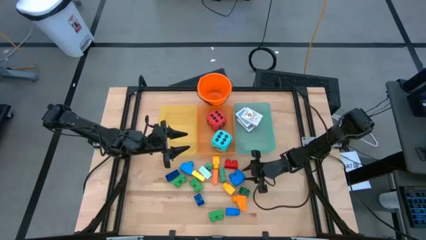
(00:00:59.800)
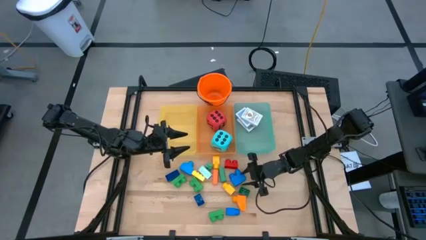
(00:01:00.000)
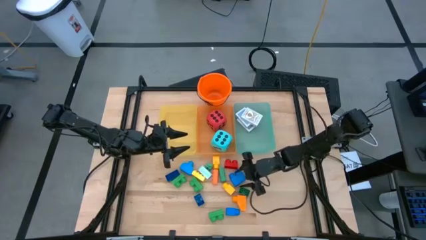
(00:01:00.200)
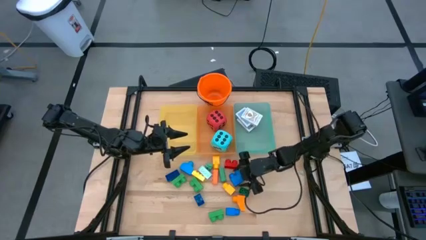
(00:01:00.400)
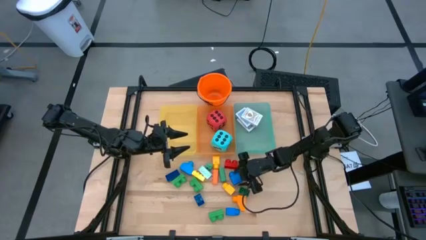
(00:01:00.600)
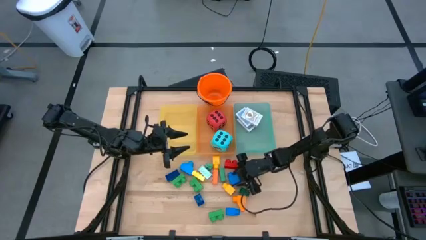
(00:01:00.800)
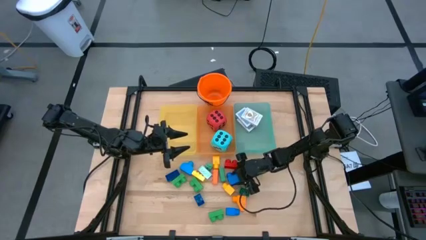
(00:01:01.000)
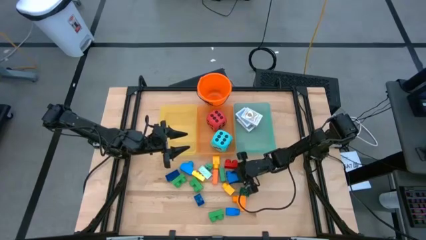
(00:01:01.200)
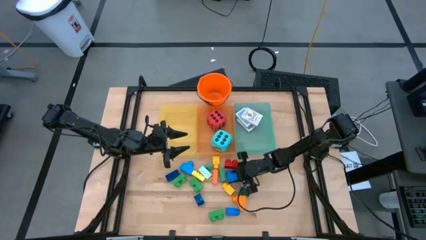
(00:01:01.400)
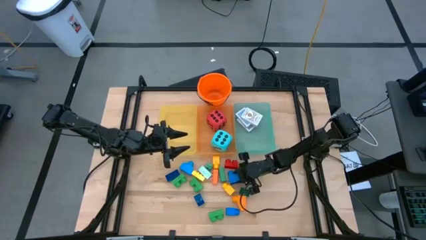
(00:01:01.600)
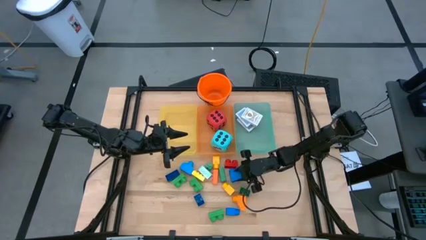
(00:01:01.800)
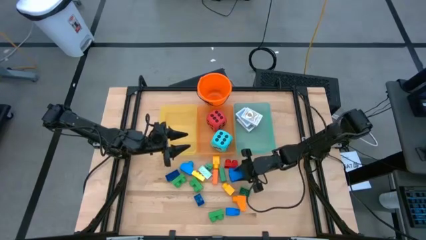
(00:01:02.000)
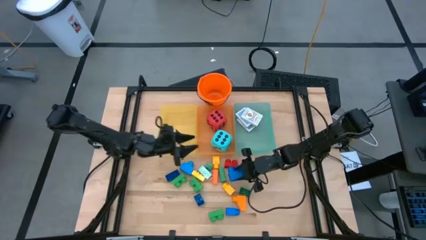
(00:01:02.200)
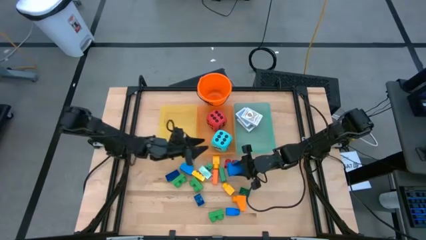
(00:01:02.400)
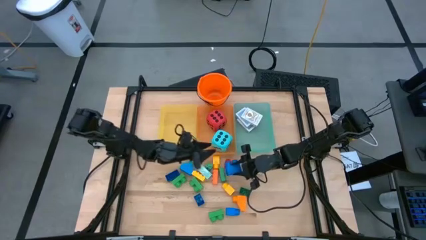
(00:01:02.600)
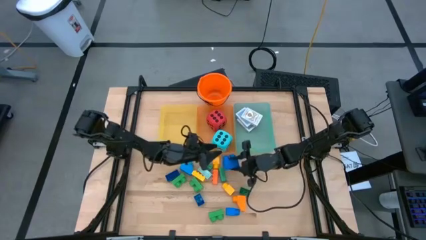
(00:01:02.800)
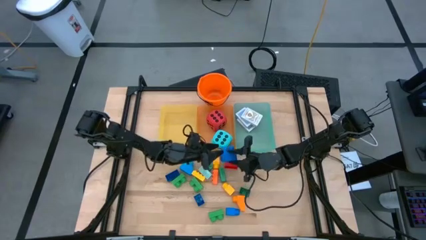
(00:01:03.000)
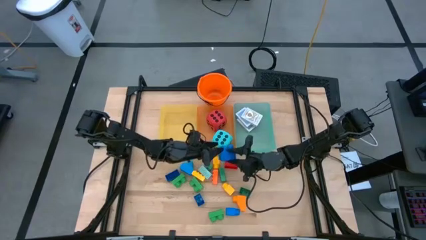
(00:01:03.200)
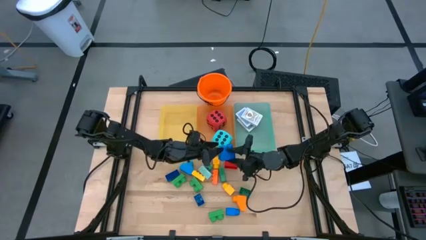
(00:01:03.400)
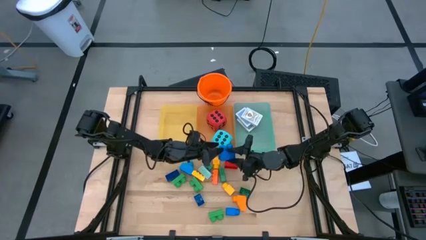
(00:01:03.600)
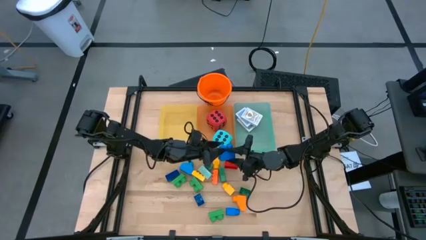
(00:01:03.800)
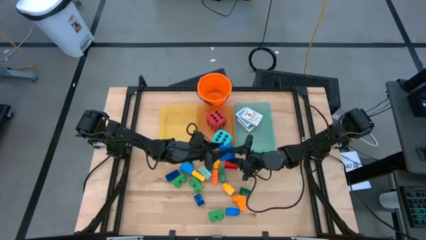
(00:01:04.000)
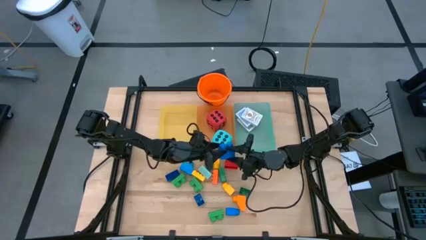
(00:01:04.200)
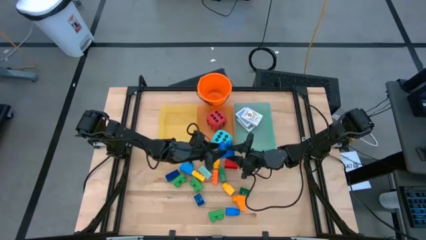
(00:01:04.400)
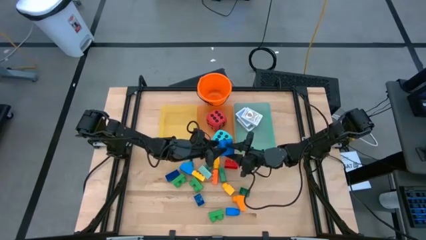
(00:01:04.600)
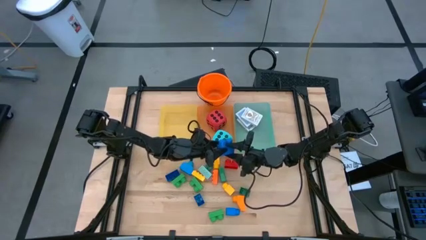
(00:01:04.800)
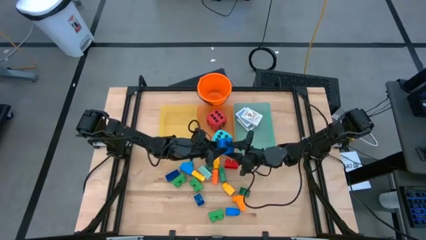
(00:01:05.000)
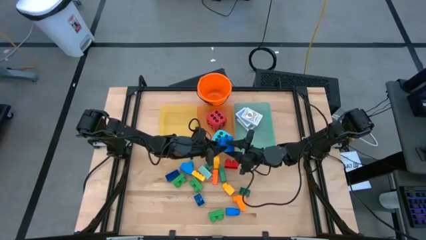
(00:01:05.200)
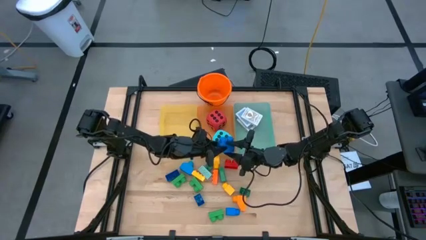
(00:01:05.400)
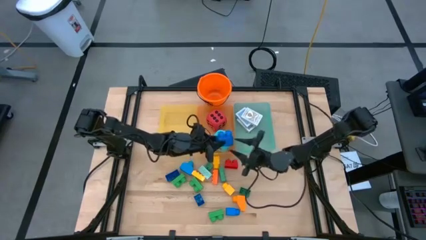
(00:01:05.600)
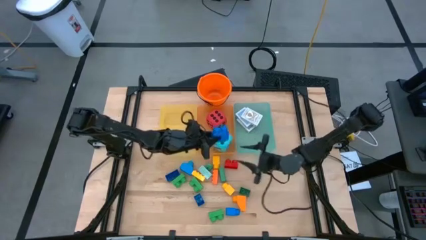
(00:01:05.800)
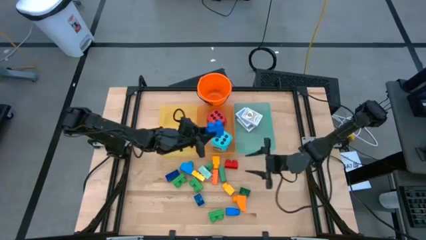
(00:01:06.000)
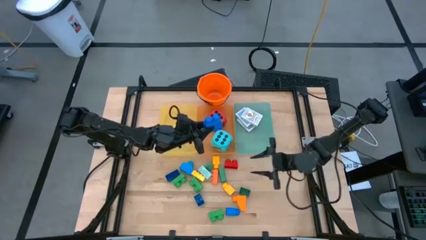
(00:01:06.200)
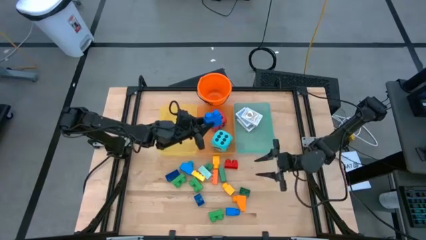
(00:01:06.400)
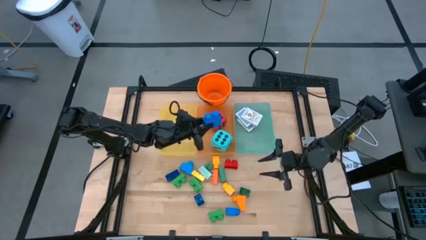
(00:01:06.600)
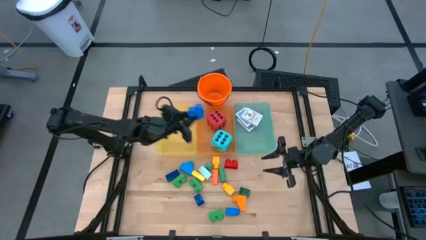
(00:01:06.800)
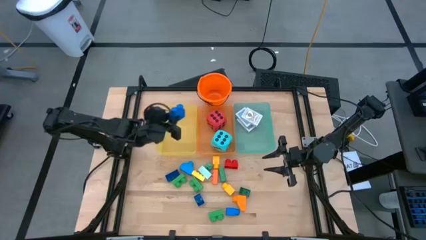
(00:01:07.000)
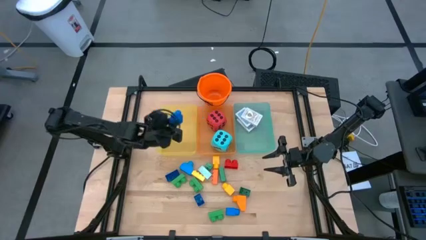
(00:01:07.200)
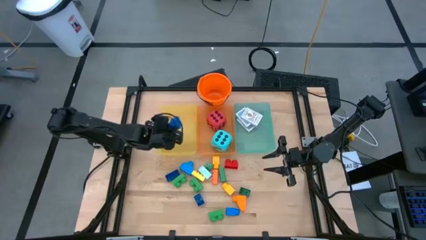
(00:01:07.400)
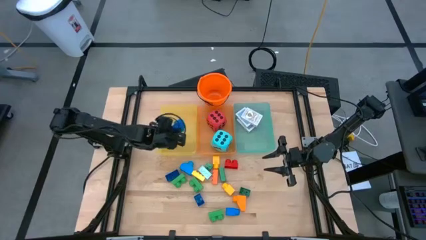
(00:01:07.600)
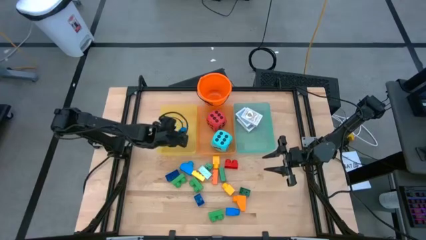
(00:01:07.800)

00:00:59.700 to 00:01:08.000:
Task: Pick & Place Toys
Put the blue game piece into the yellow bin

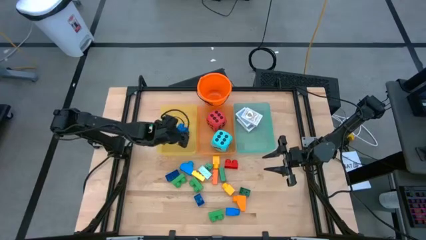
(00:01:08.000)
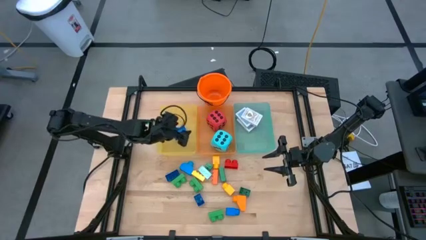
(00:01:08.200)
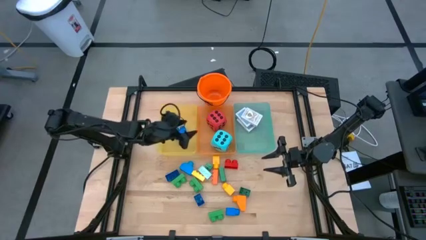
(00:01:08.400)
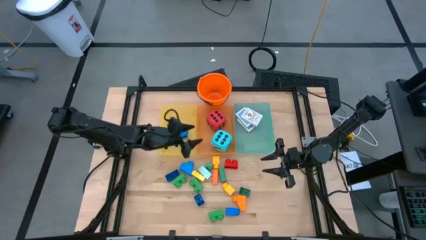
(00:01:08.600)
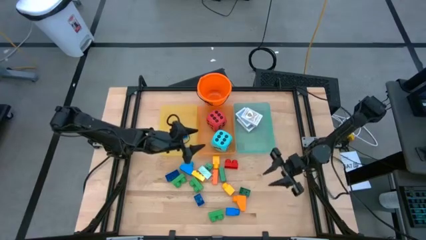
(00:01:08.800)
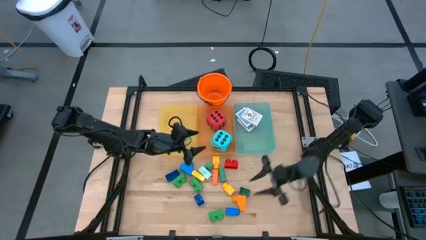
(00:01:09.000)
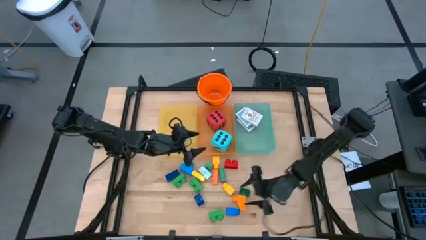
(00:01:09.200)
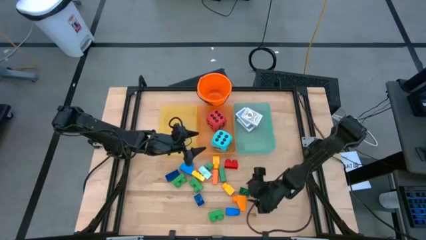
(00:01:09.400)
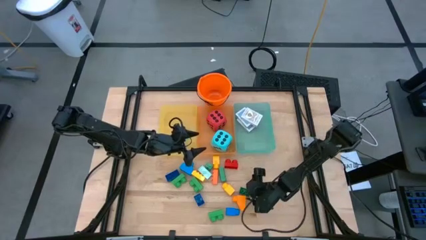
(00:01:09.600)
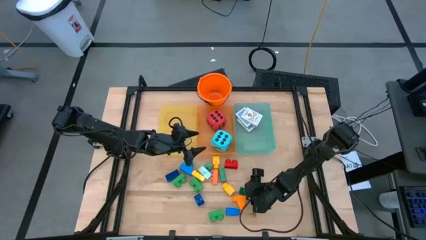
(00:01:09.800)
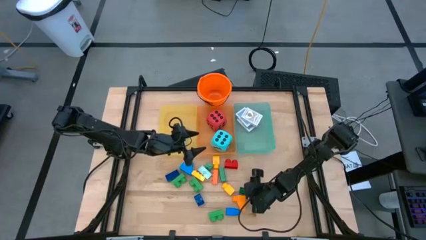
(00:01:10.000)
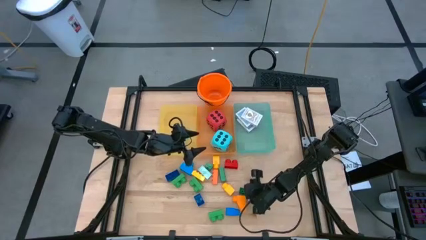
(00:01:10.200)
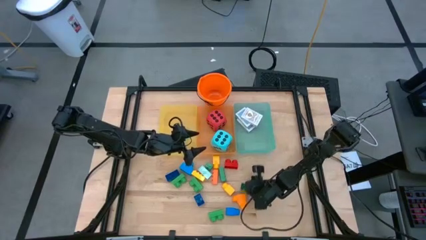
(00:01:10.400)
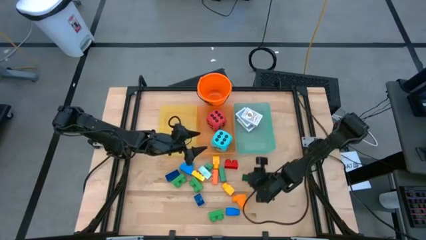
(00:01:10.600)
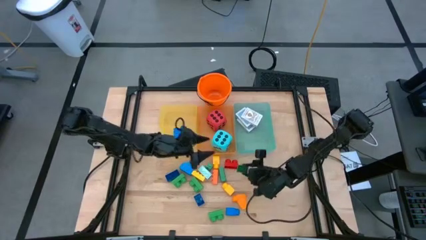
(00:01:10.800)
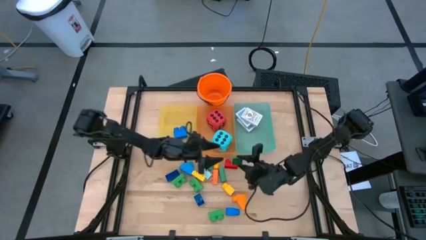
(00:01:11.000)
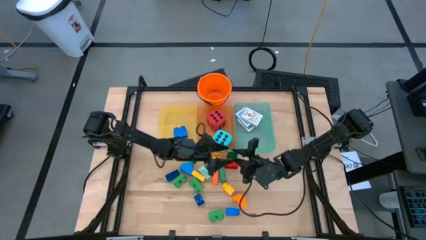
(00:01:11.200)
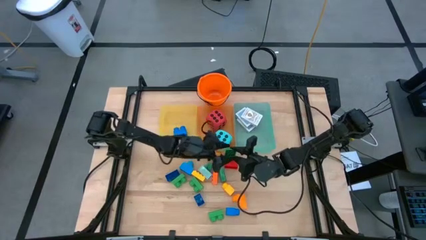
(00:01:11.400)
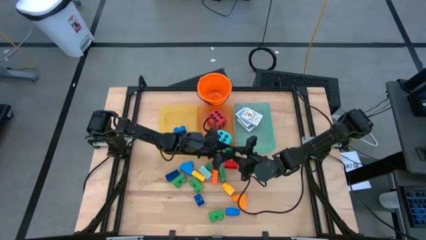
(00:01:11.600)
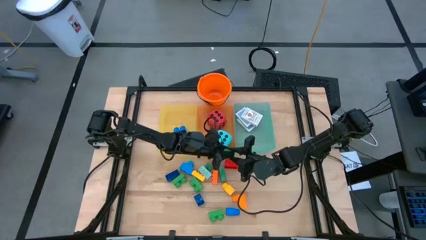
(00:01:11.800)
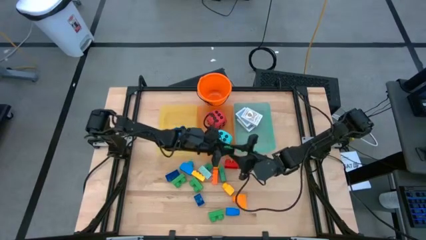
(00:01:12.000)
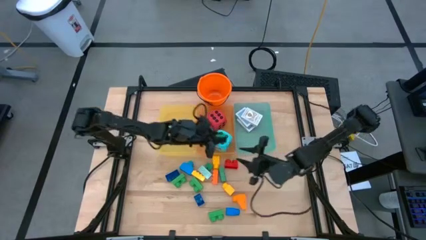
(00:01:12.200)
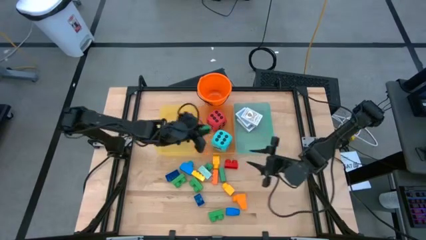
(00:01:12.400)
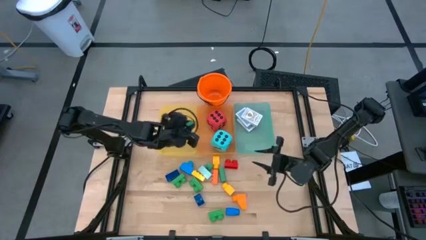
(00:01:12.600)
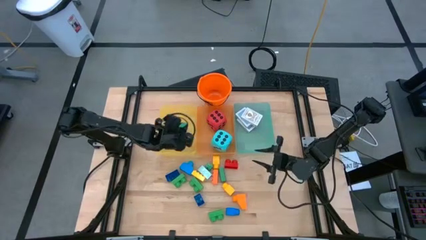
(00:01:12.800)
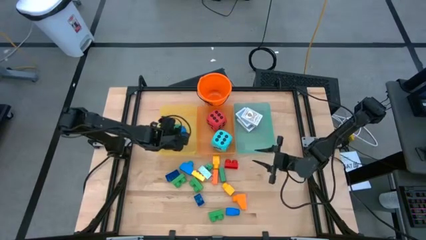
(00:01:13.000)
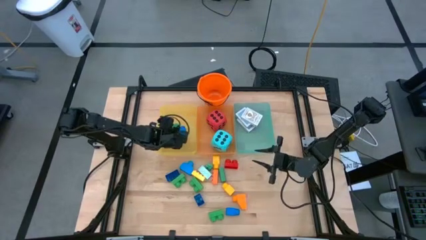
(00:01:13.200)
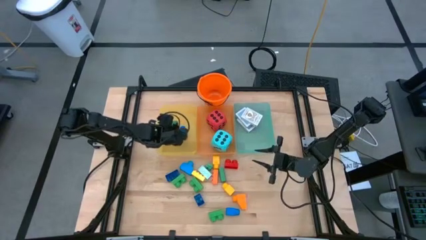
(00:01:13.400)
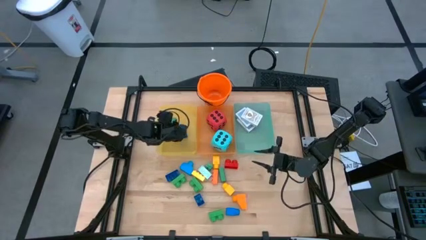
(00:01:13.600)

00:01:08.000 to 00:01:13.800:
Put the bottom green game piece into the yellow bin

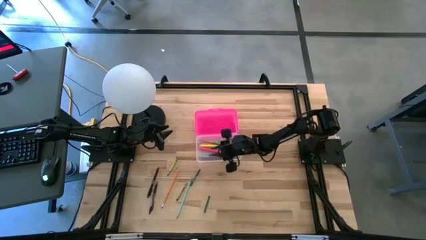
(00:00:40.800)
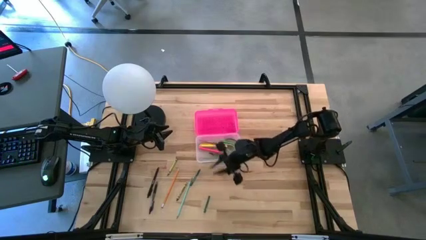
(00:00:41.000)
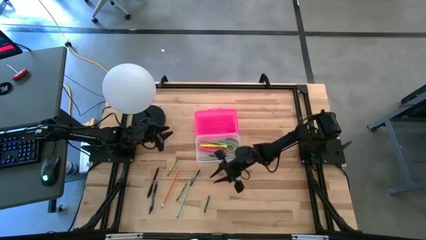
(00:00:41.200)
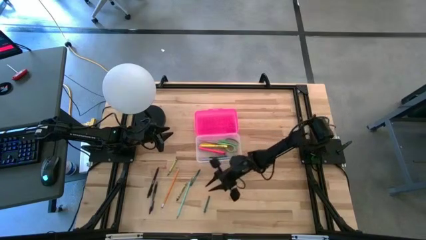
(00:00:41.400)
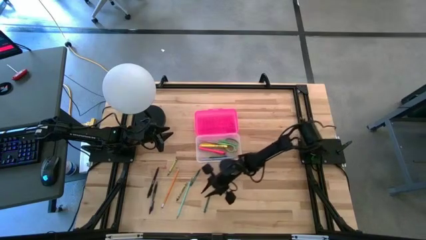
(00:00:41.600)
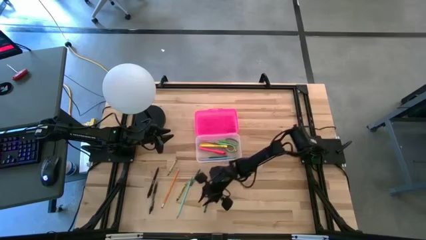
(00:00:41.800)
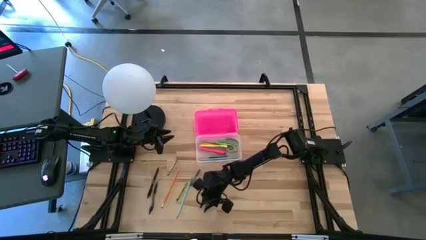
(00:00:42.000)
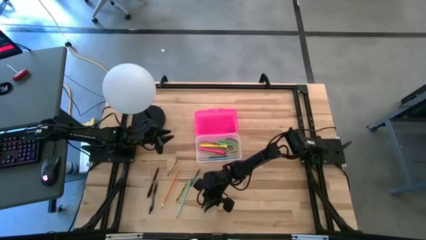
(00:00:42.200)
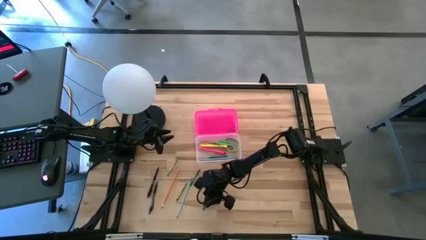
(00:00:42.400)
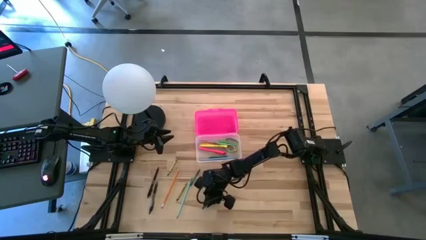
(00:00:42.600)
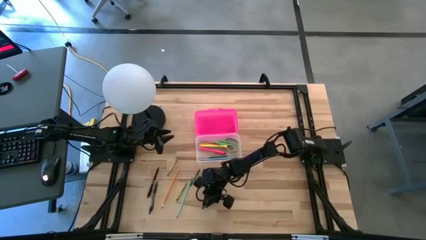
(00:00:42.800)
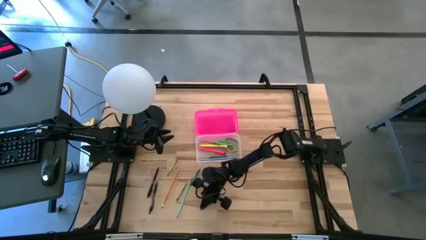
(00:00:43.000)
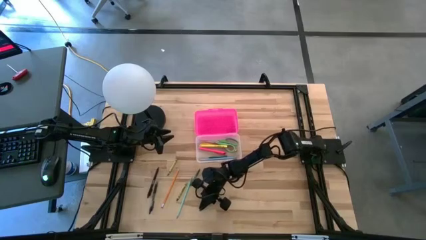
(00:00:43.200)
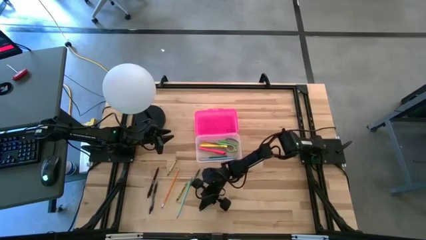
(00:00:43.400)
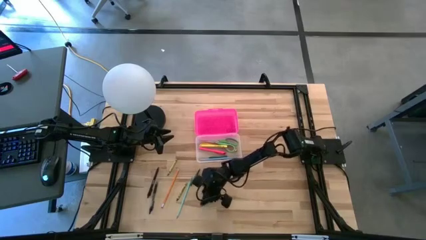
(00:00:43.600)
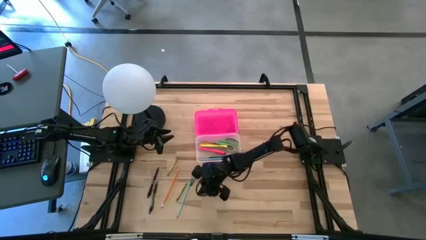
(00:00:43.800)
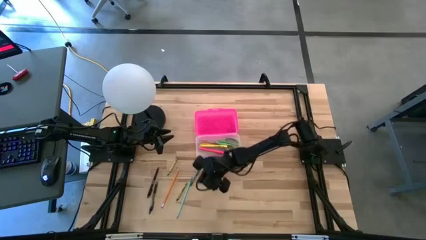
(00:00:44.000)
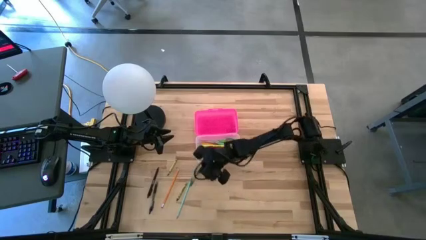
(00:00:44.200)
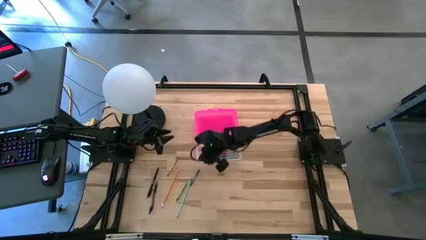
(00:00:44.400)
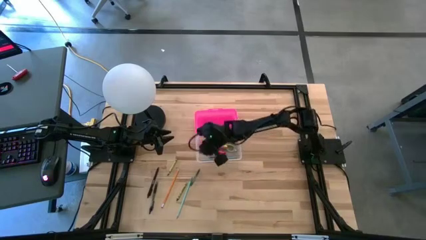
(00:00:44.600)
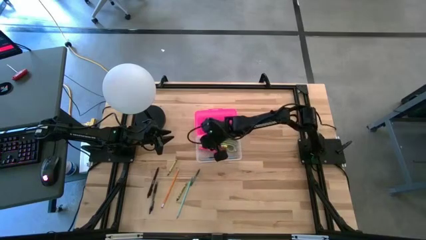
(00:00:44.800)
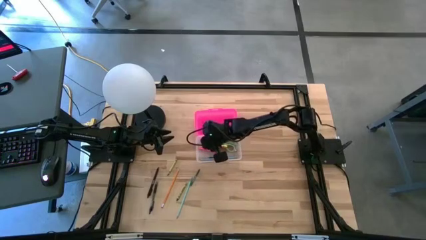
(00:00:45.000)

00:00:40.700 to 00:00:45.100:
Task: Pick & place school supplies into a supply box
Put the right dark green crayon into the pink supply box
